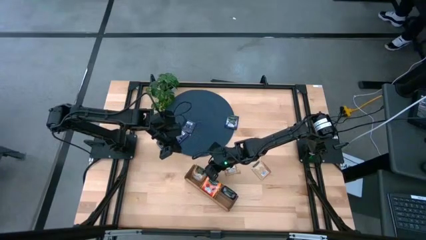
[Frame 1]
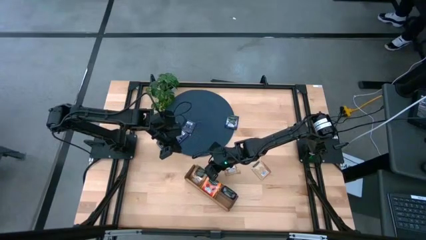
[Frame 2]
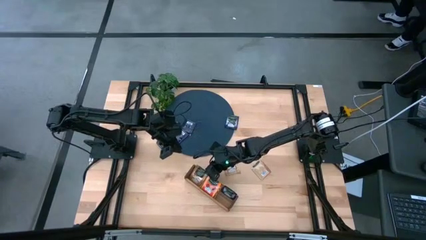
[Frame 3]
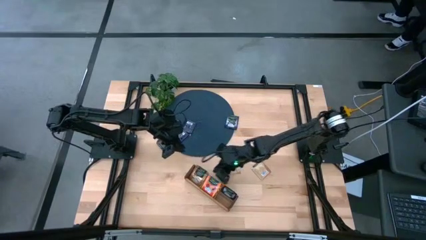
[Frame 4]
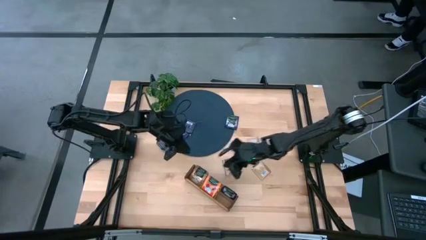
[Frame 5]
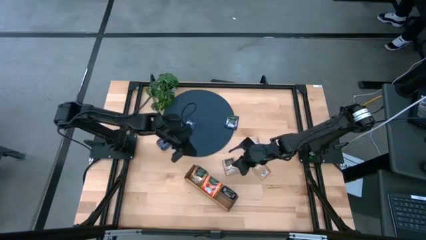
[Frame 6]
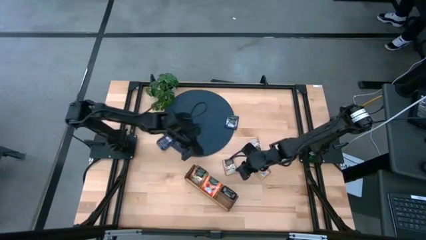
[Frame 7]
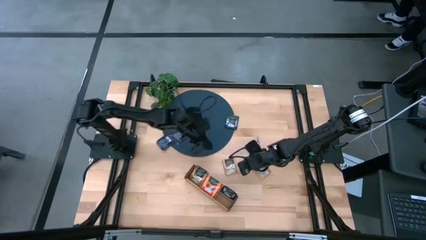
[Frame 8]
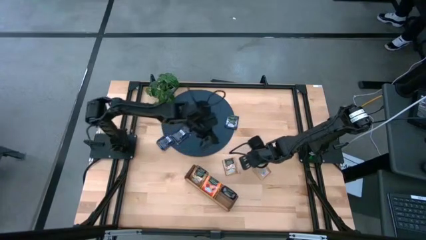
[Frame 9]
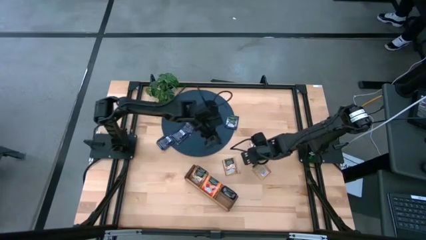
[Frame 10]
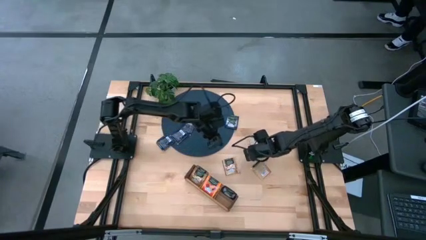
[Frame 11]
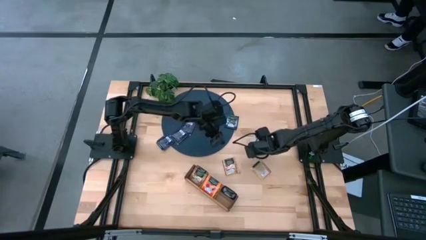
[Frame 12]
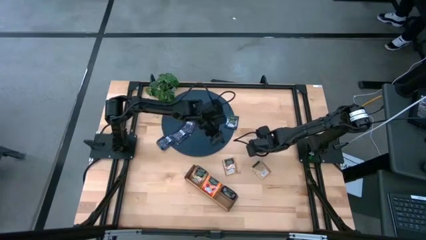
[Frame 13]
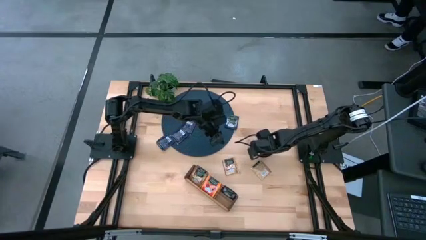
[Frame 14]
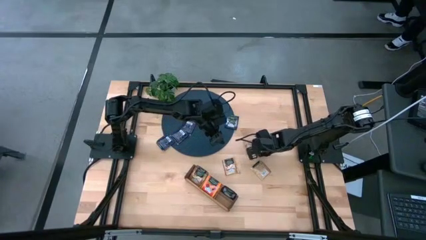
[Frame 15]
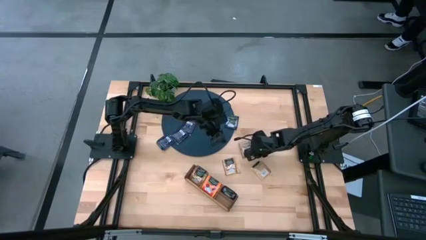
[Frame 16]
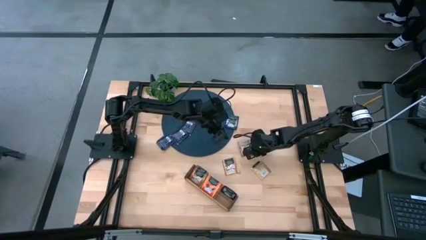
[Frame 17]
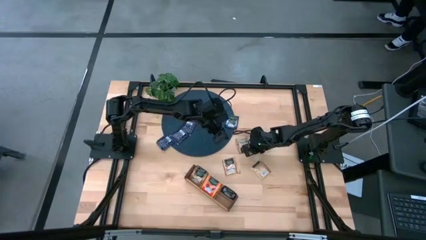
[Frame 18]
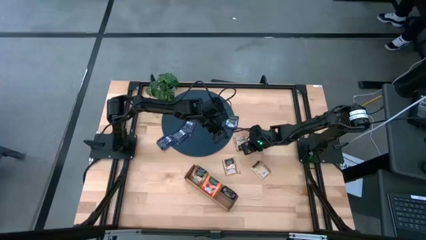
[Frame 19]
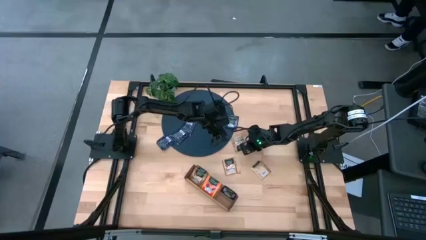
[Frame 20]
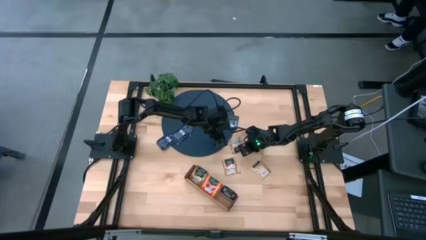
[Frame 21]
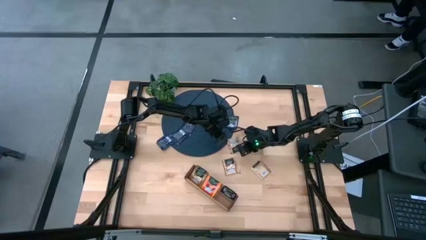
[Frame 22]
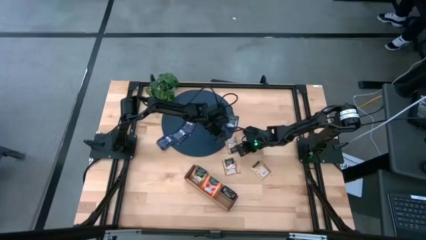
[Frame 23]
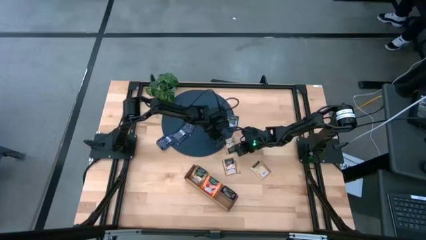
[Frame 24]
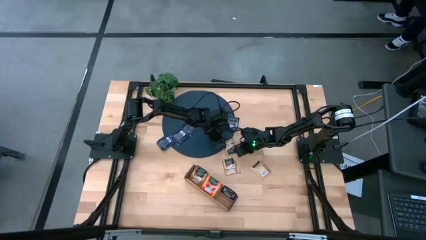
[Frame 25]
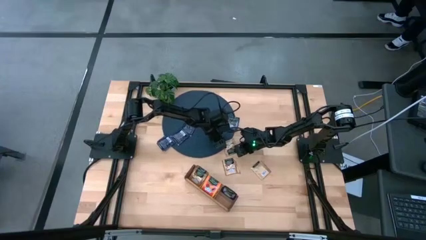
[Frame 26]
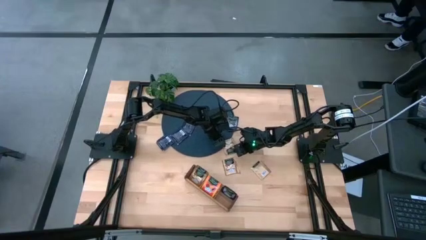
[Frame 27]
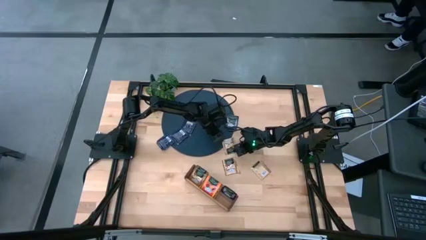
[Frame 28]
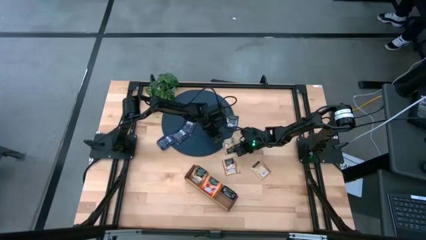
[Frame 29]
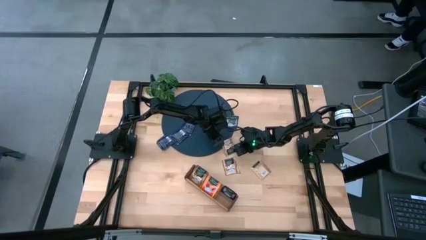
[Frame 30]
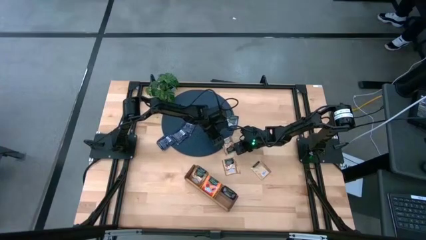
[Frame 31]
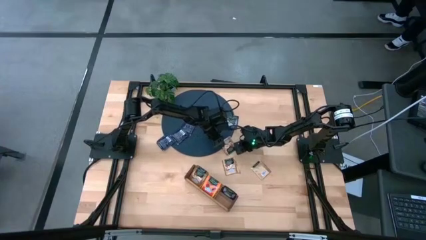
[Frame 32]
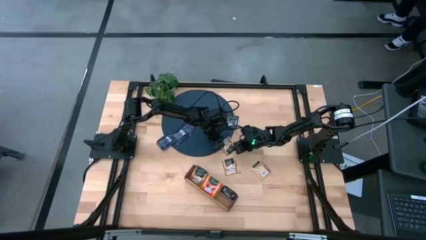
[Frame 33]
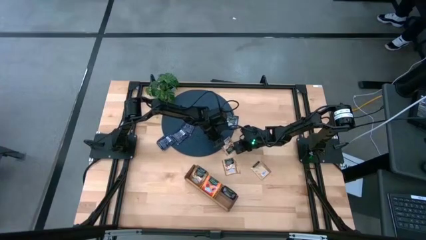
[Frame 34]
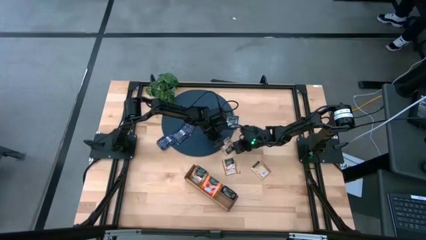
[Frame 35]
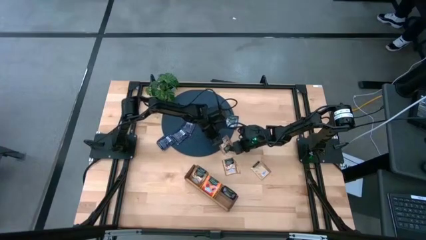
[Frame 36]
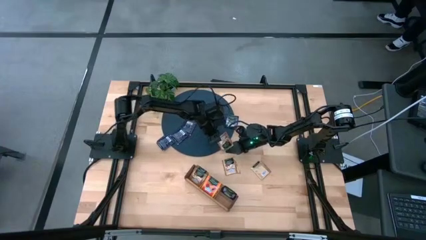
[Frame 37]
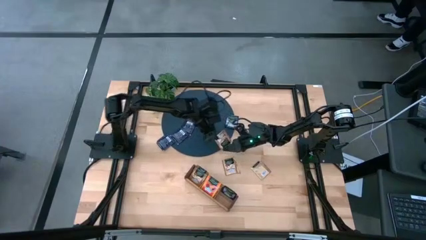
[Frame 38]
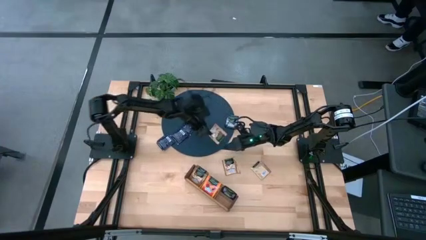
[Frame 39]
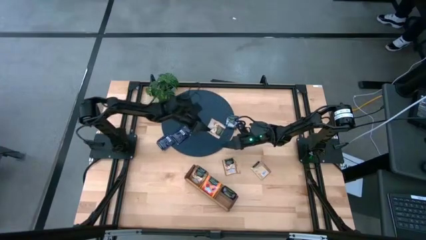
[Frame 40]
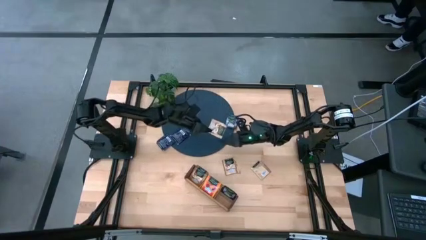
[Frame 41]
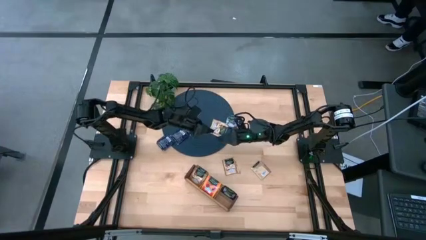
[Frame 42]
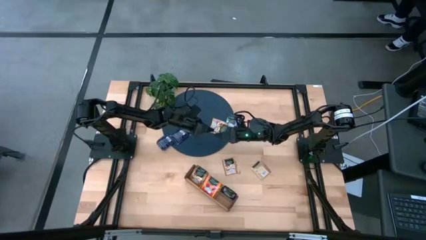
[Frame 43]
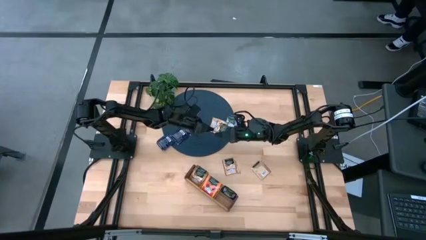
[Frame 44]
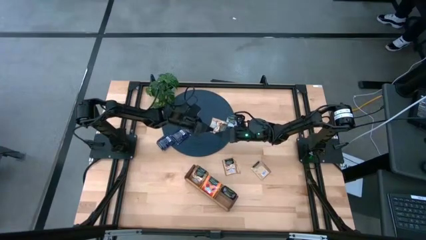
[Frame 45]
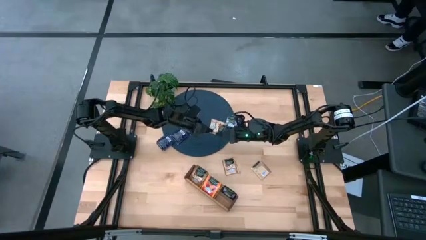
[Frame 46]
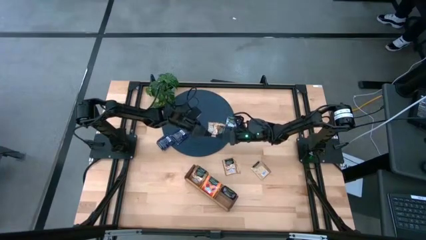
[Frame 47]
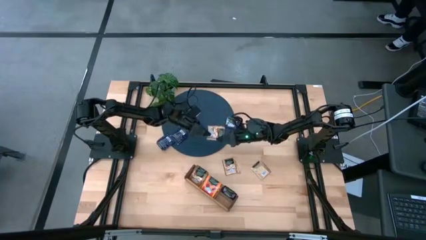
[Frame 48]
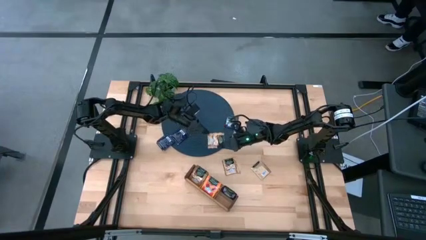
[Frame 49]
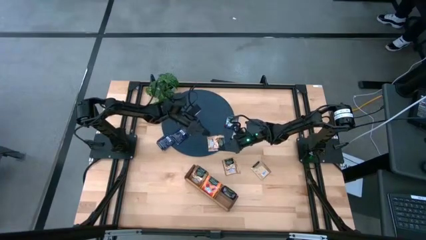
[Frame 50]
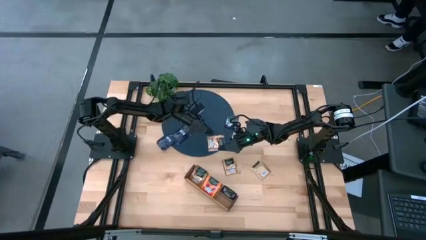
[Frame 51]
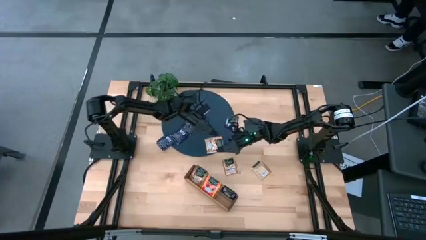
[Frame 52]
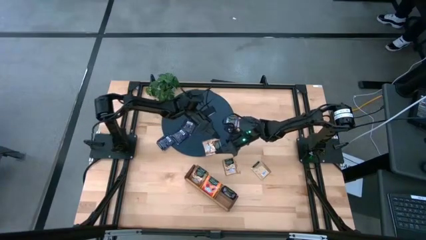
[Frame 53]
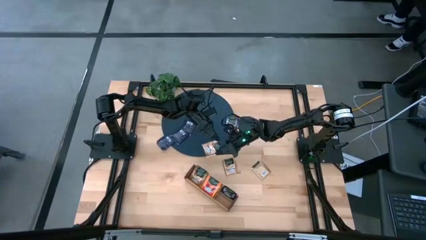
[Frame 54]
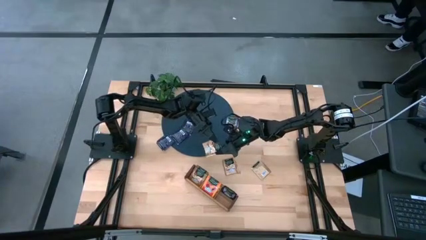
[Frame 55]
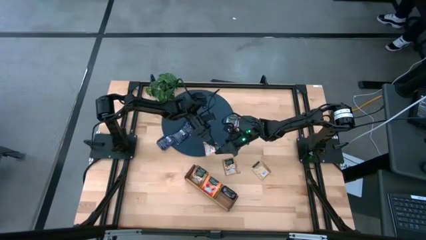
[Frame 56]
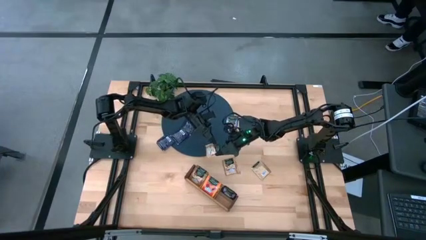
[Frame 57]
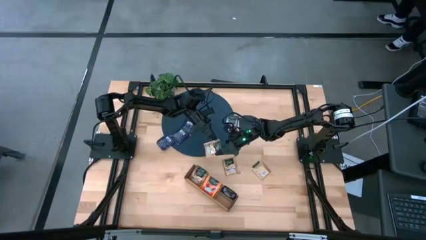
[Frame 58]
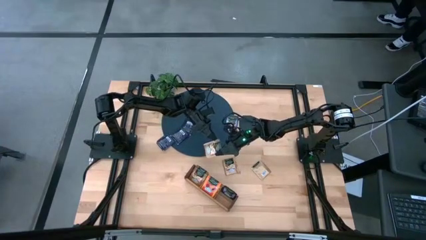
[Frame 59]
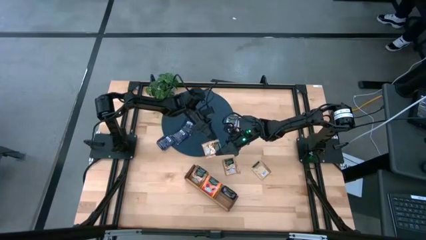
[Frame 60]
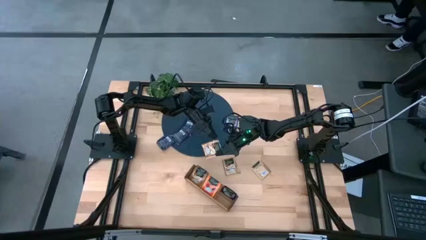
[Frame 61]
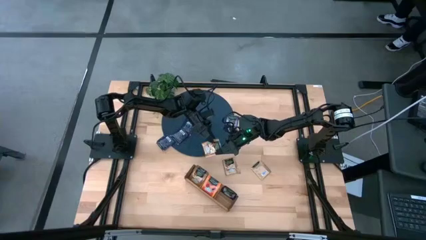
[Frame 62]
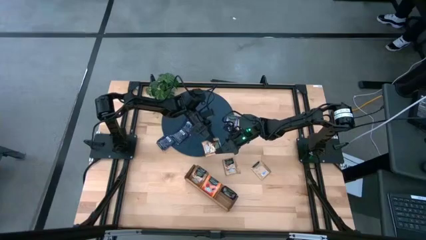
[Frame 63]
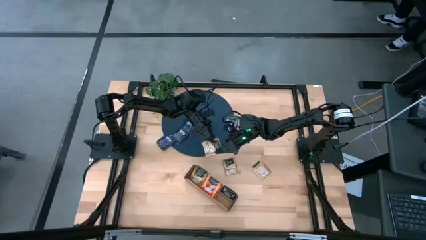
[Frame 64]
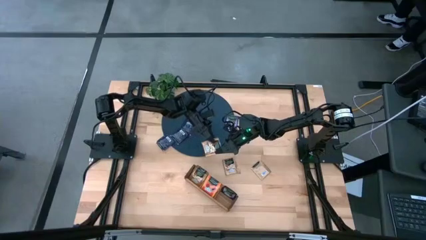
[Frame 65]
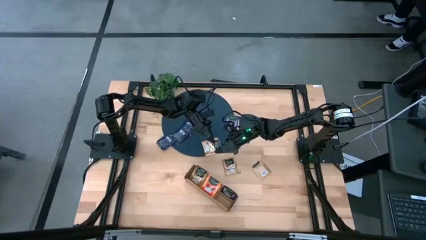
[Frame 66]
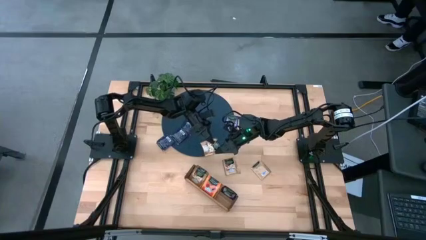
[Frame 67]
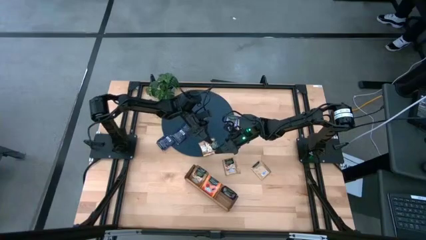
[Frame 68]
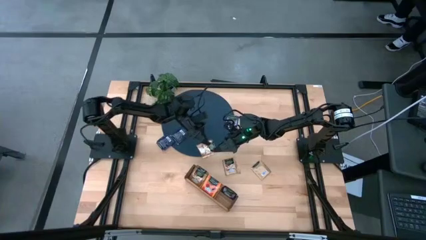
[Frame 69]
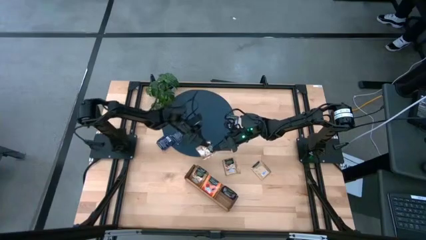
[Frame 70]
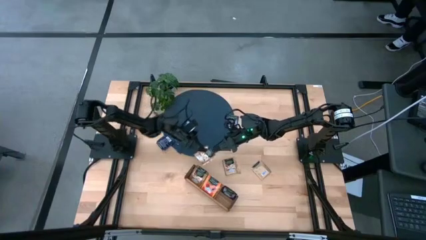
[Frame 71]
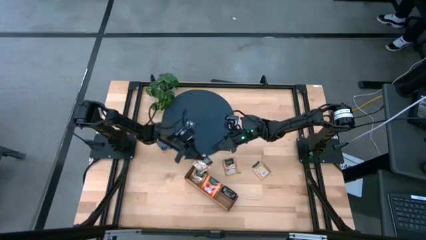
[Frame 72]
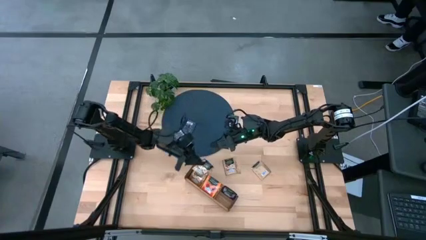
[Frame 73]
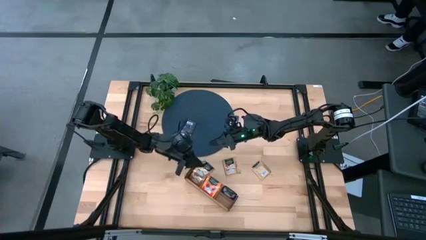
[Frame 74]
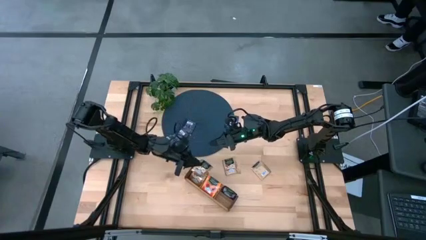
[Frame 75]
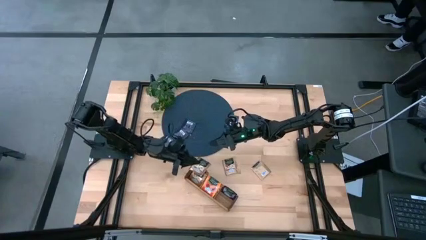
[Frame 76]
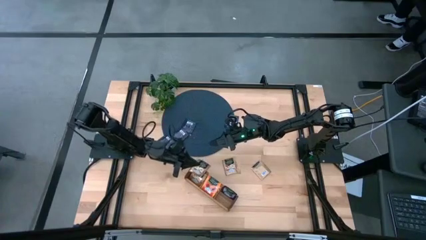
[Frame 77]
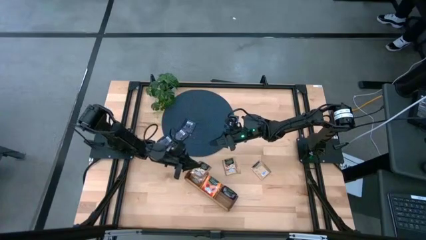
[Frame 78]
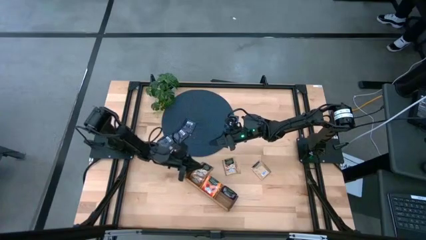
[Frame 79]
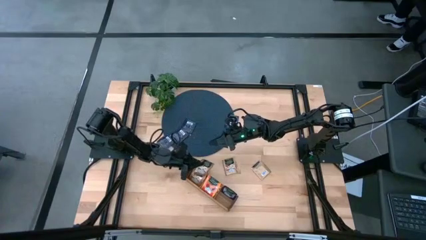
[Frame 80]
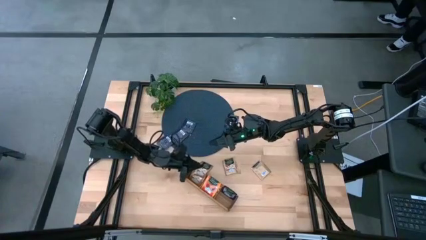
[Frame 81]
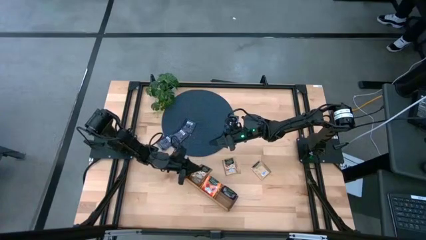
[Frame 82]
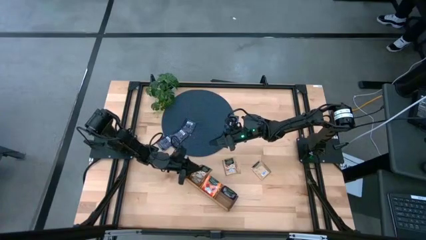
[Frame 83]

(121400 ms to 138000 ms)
Task: Pick & Place Tea
Put the brown tea bag into the left section of the wooden organizer
